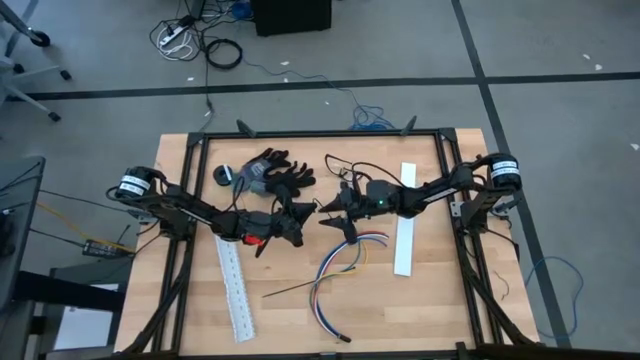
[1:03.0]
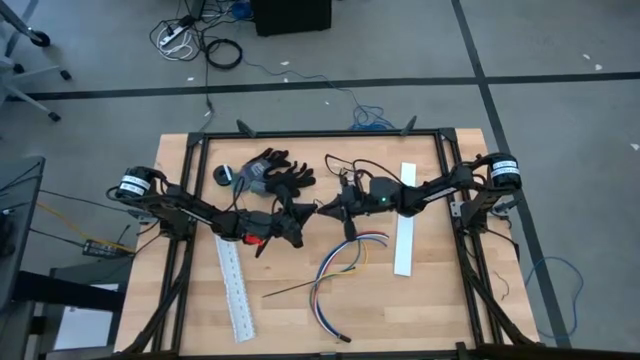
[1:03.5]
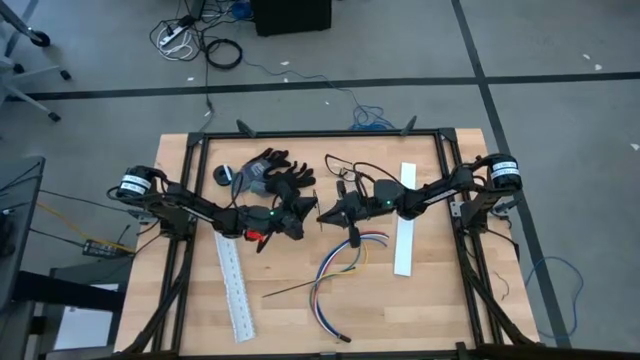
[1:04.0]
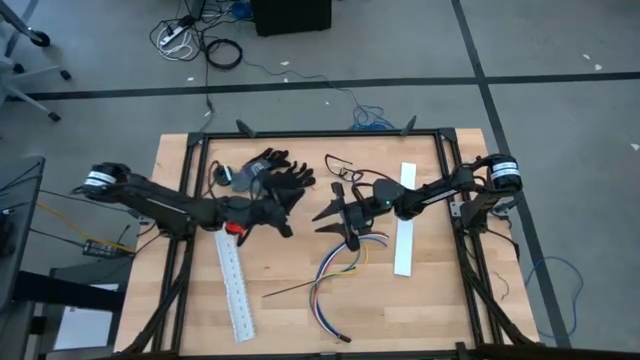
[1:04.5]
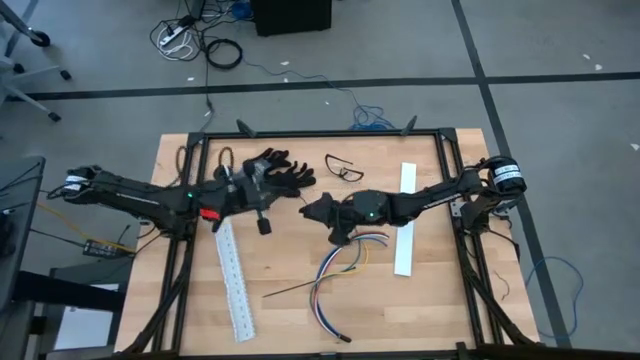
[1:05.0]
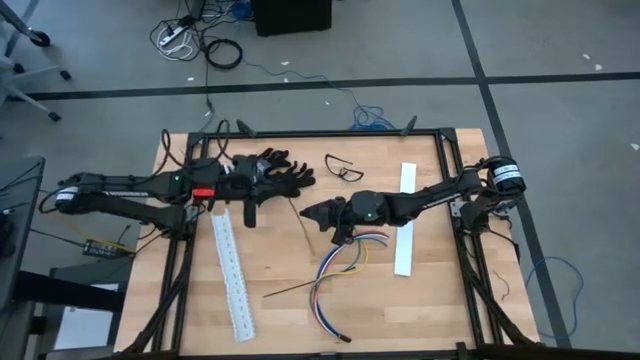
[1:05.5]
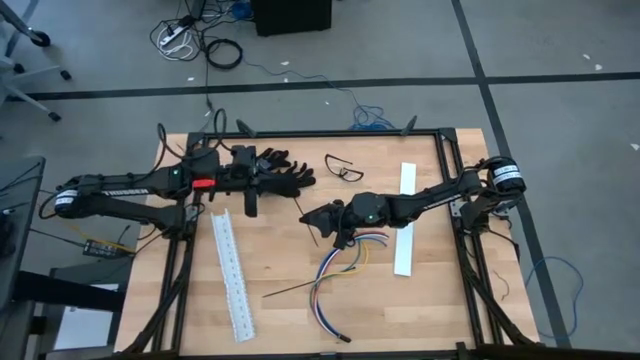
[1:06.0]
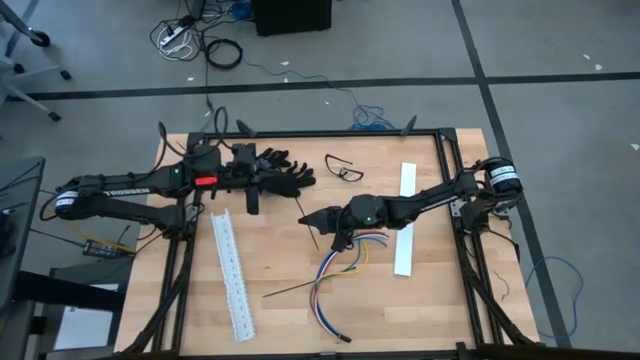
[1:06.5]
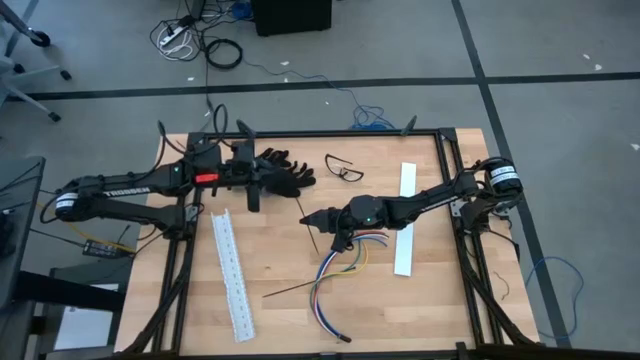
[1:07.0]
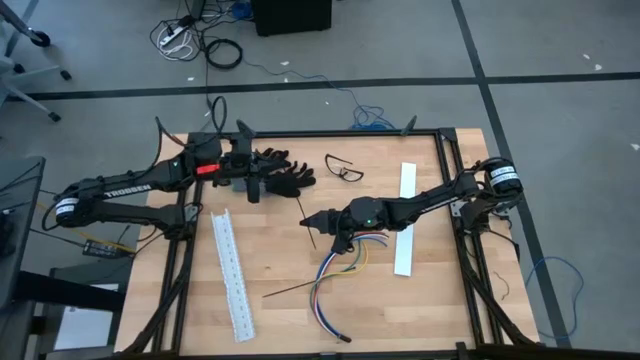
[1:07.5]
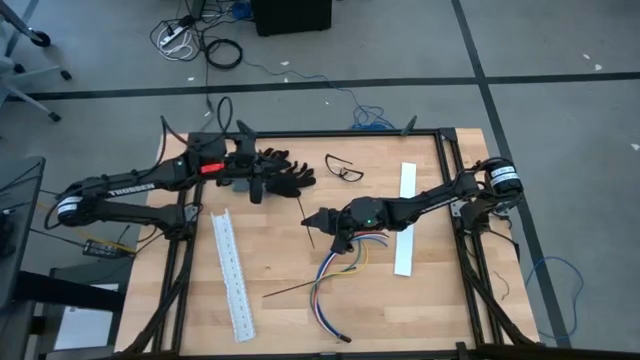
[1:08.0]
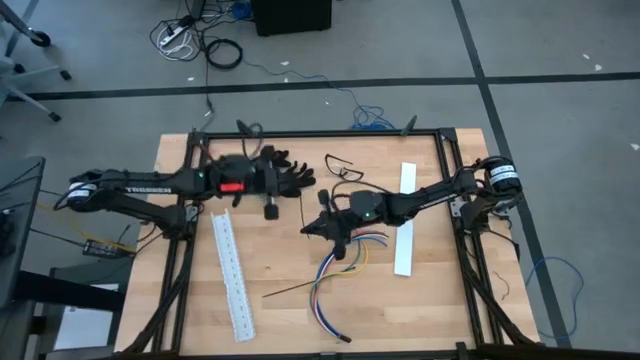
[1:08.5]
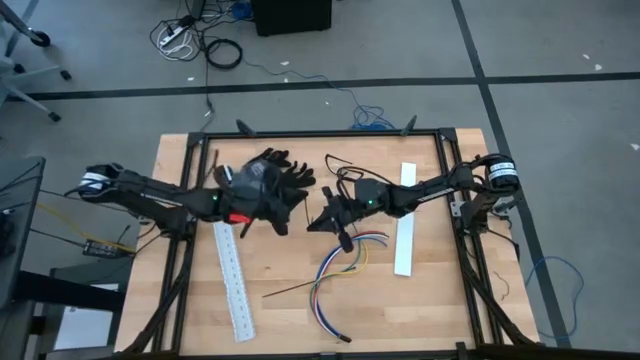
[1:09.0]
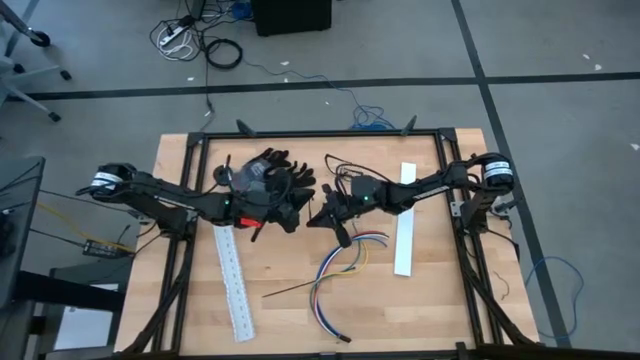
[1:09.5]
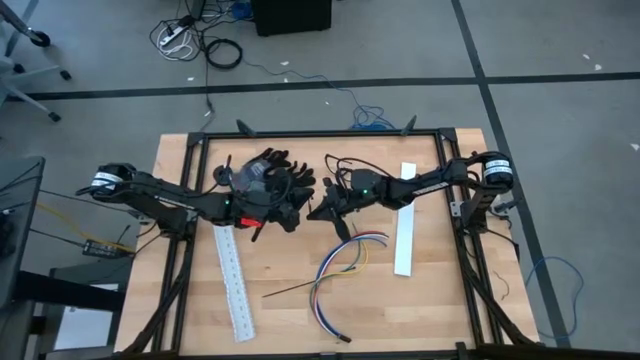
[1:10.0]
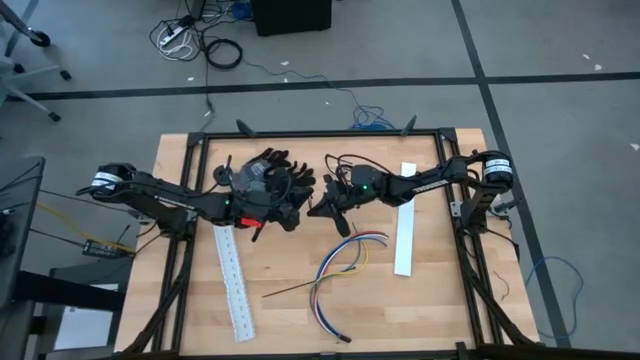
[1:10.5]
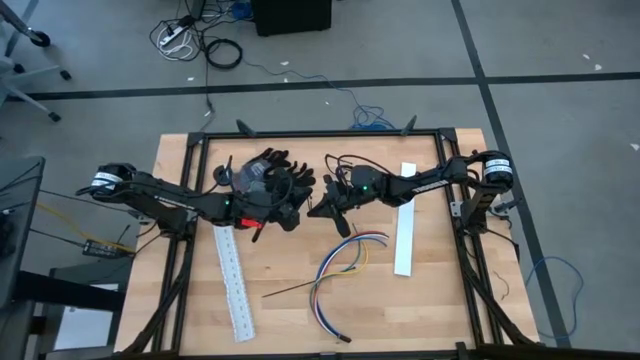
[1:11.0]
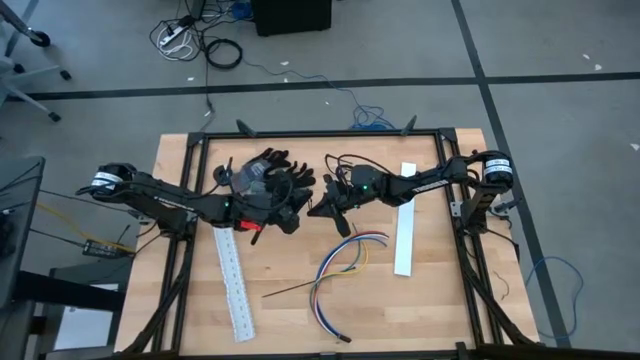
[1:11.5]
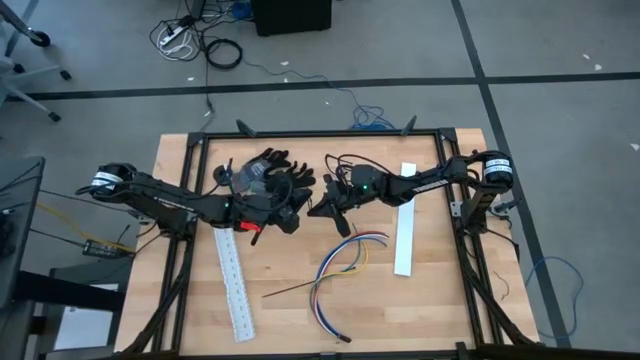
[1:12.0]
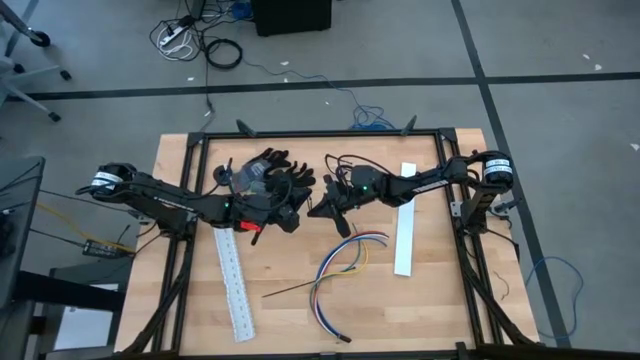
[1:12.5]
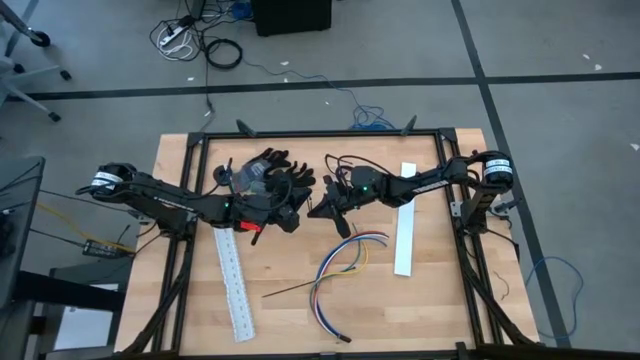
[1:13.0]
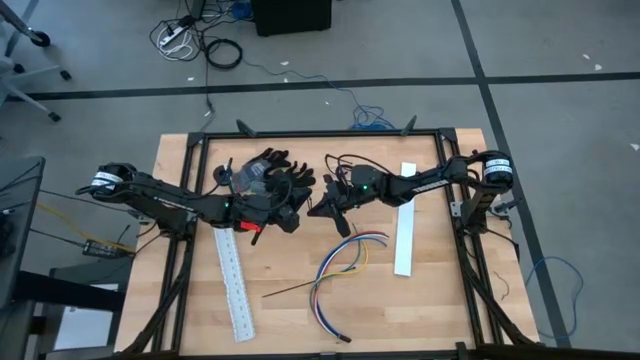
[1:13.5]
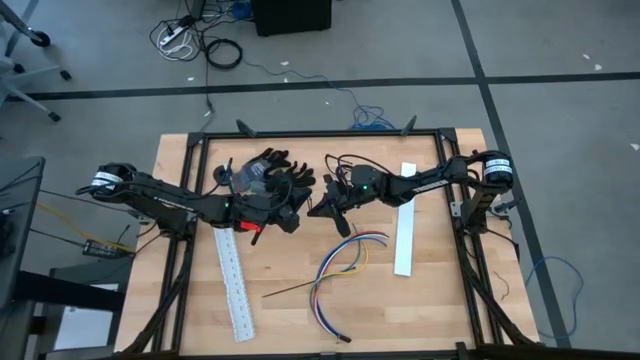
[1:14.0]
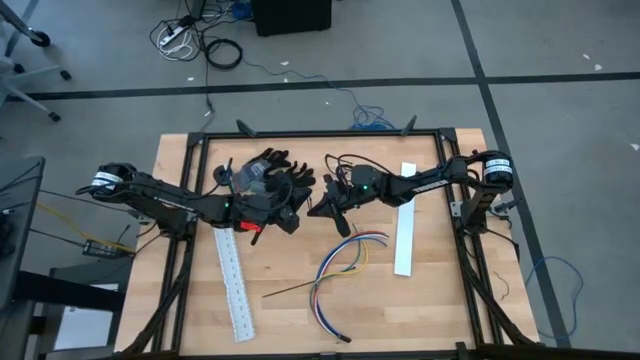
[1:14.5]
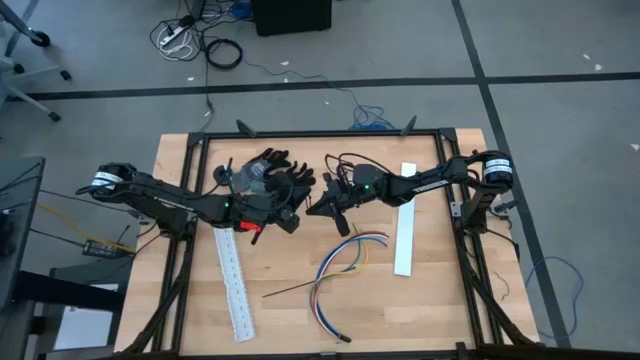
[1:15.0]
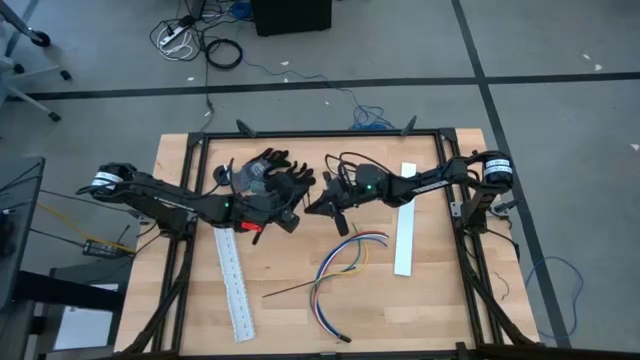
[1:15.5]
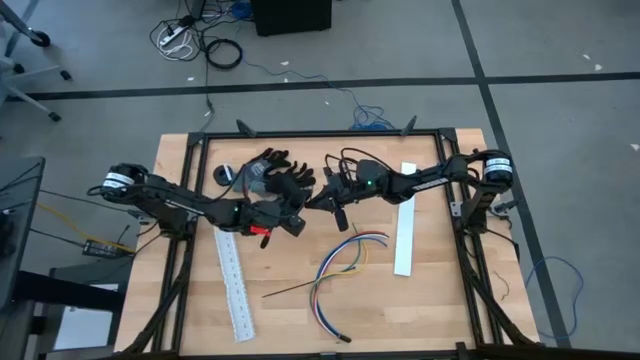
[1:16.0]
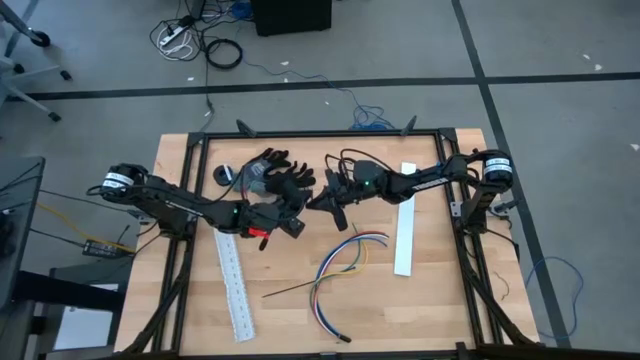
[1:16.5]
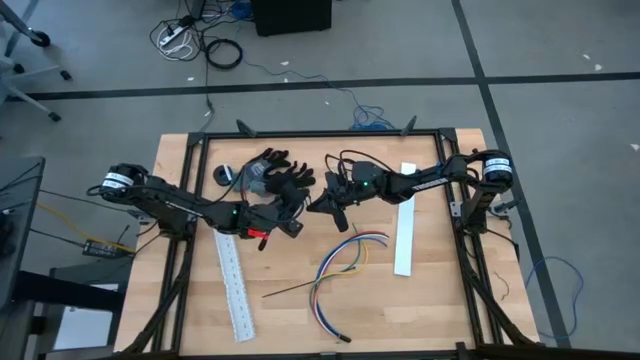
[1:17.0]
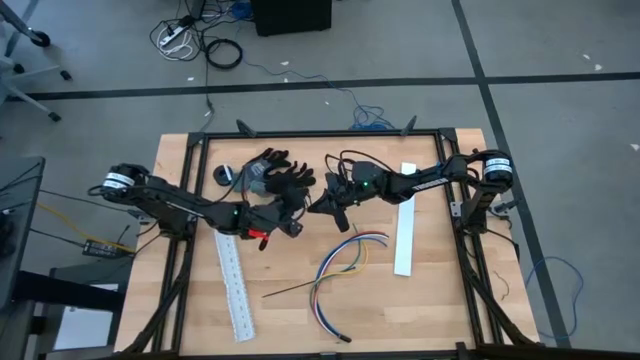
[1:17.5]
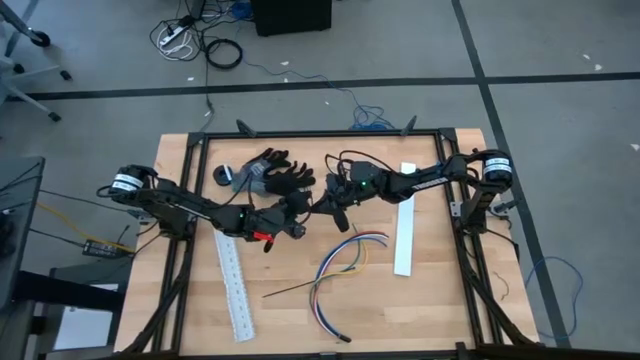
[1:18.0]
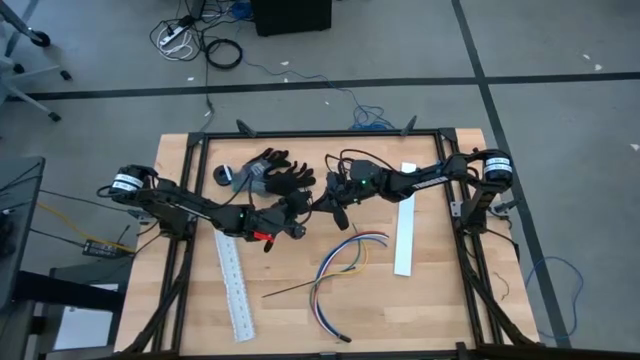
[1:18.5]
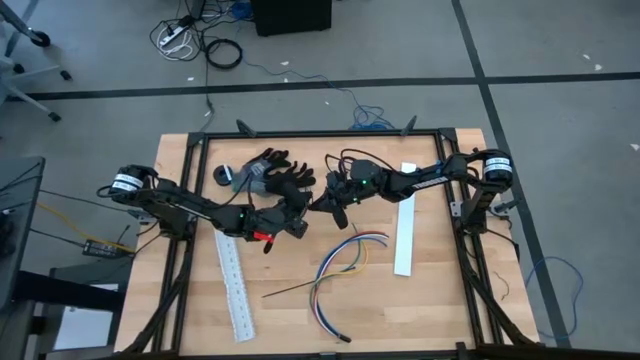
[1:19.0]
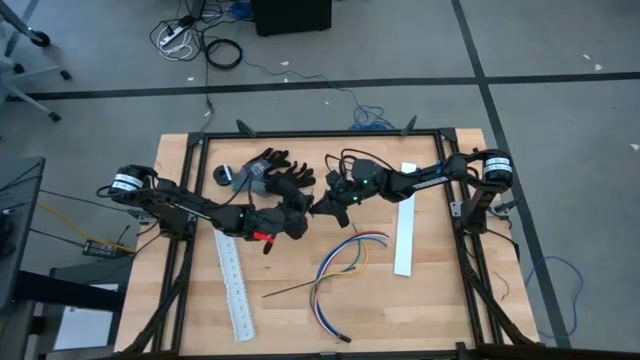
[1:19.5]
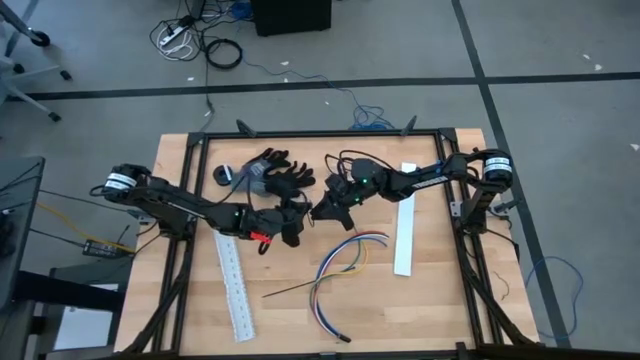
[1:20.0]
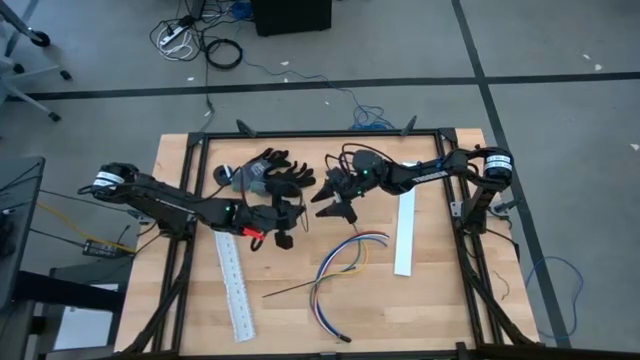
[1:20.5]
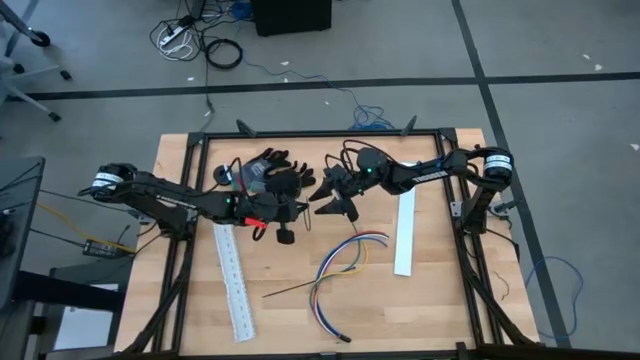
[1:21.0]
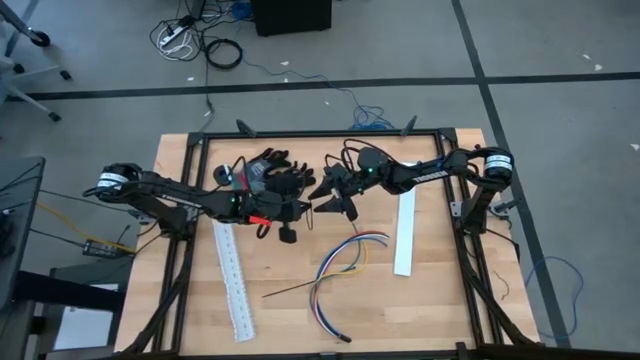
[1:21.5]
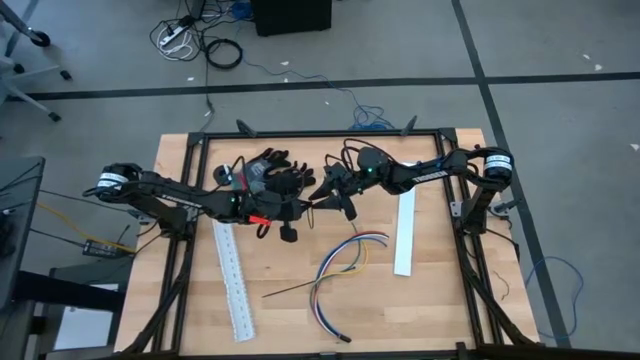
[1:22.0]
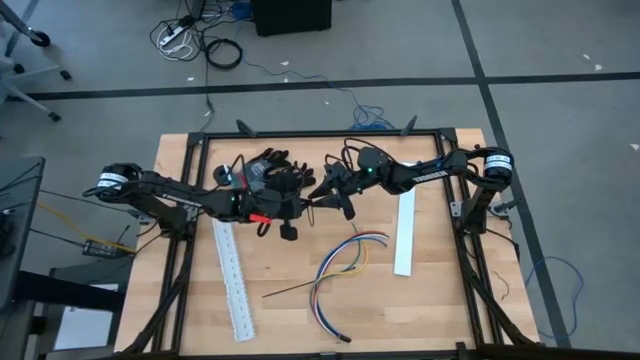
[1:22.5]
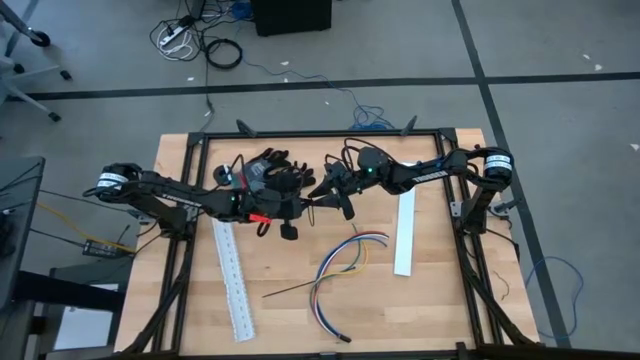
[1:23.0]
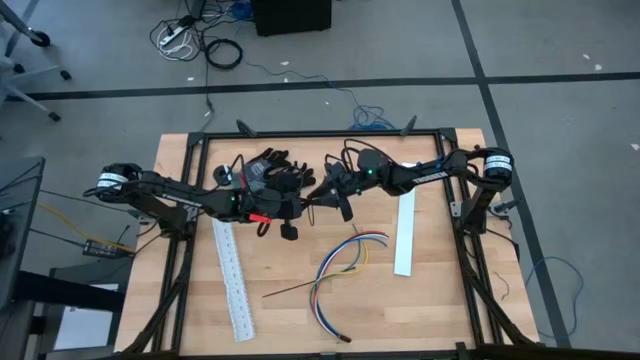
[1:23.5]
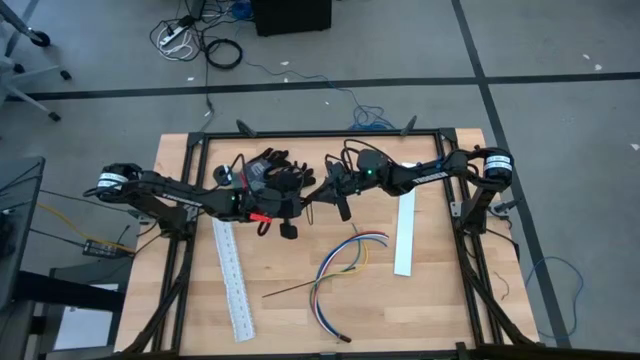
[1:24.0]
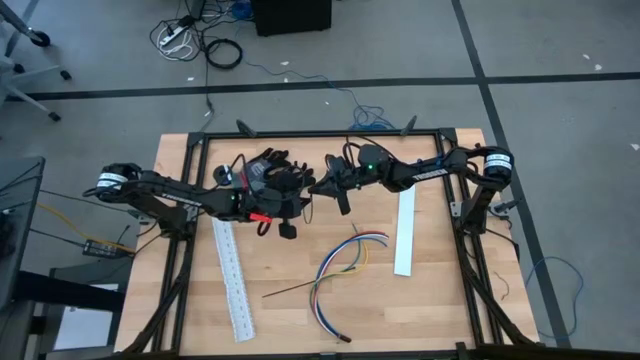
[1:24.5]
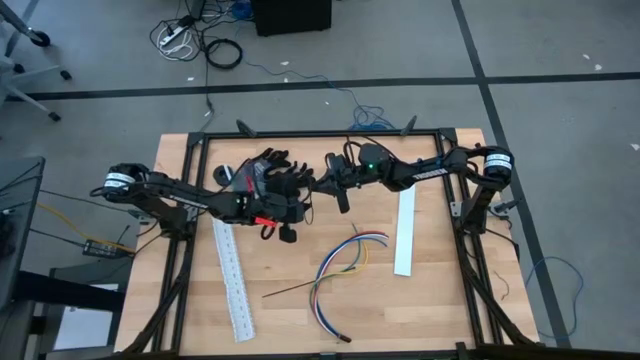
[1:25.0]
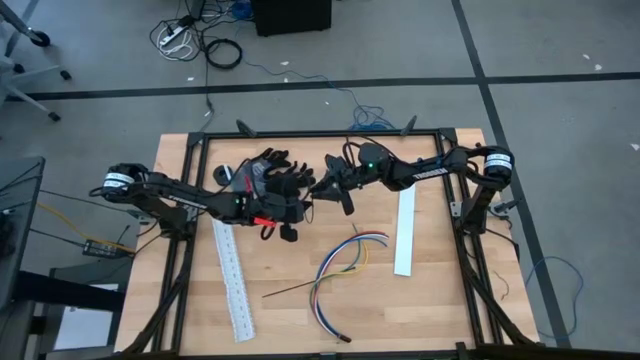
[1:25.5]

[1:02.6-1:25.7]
Task: Ziptie cables
Insert the top black zip tie pointed tail end through the slot to form a loop
